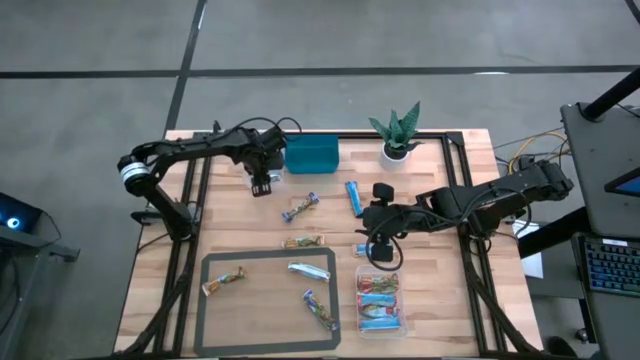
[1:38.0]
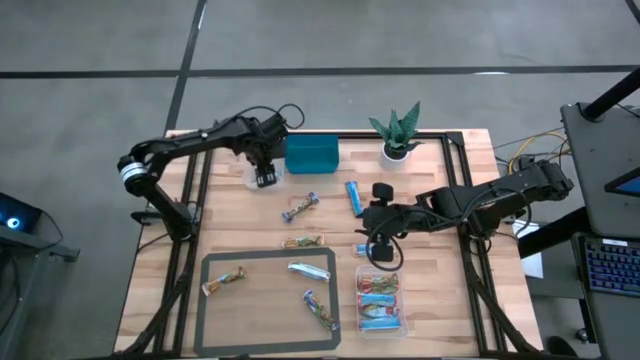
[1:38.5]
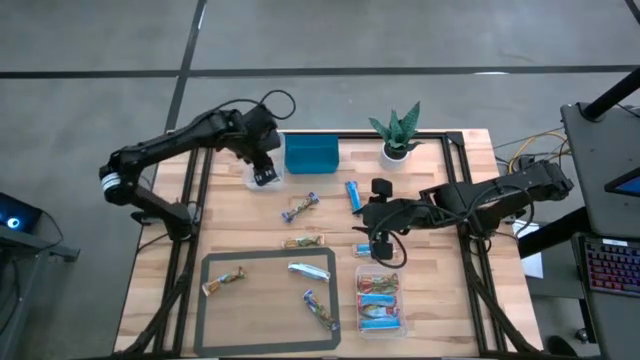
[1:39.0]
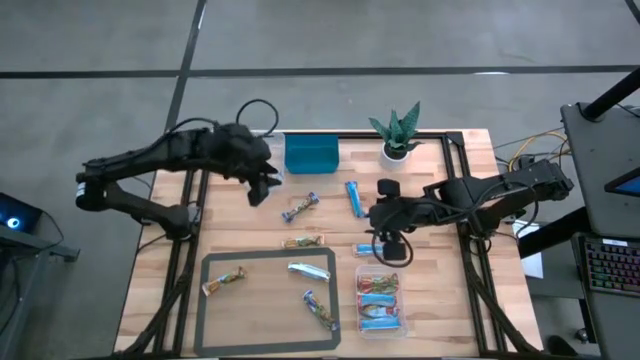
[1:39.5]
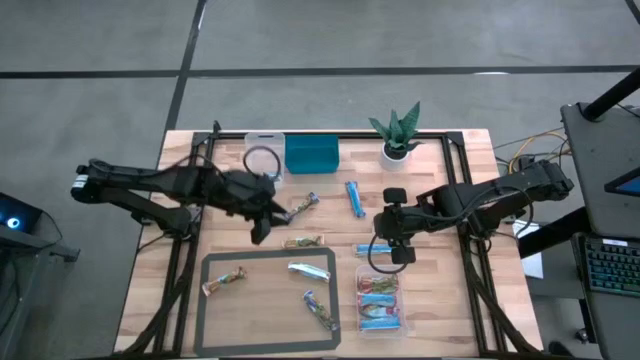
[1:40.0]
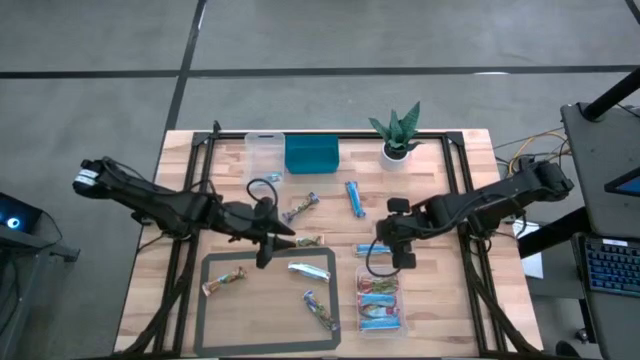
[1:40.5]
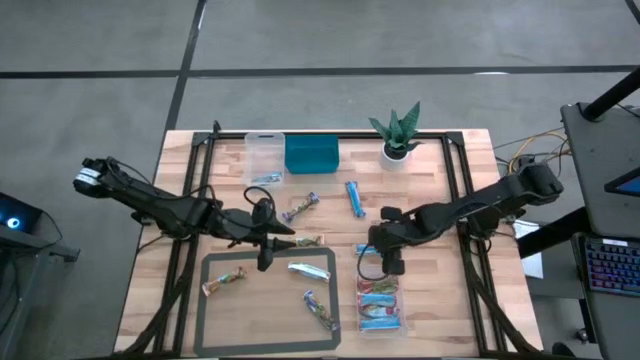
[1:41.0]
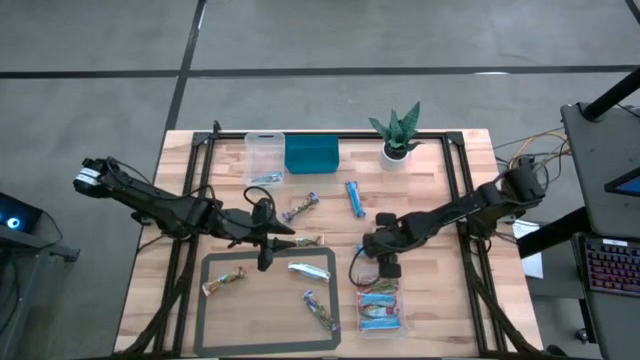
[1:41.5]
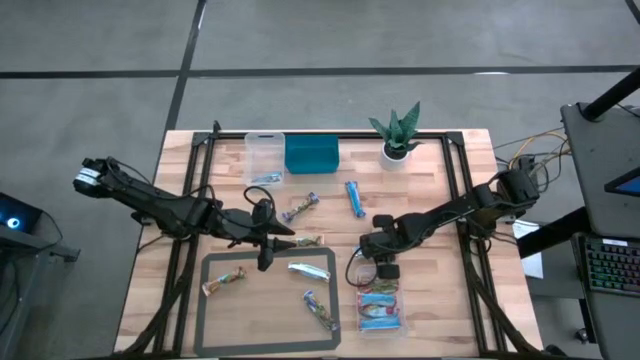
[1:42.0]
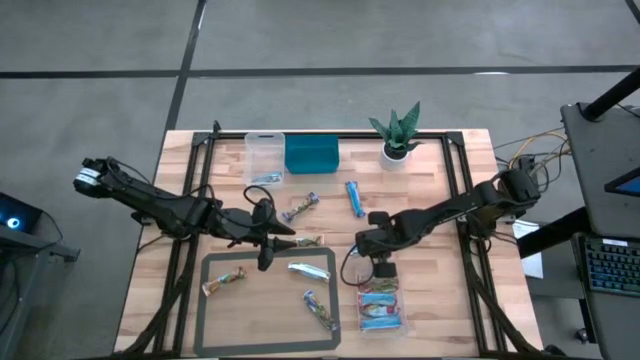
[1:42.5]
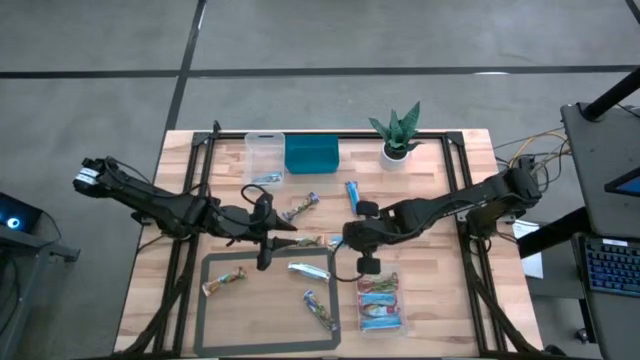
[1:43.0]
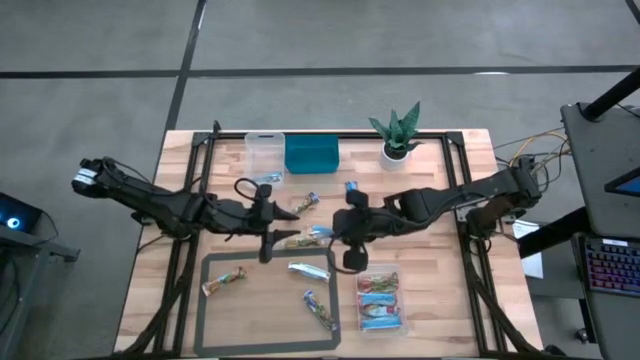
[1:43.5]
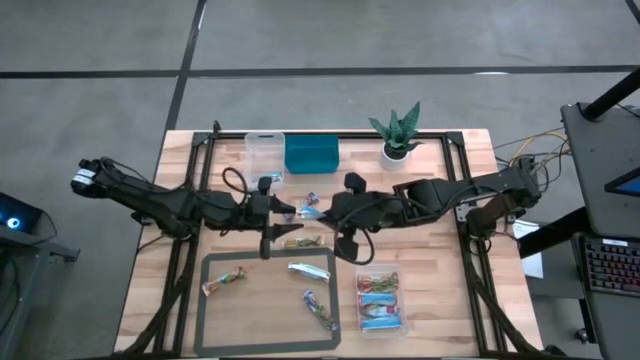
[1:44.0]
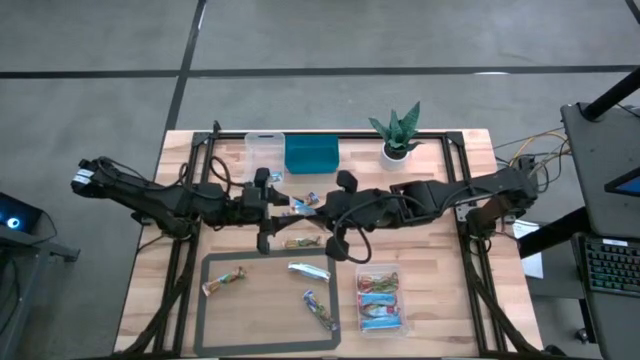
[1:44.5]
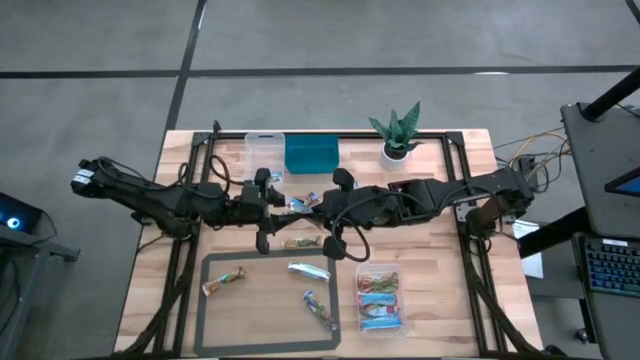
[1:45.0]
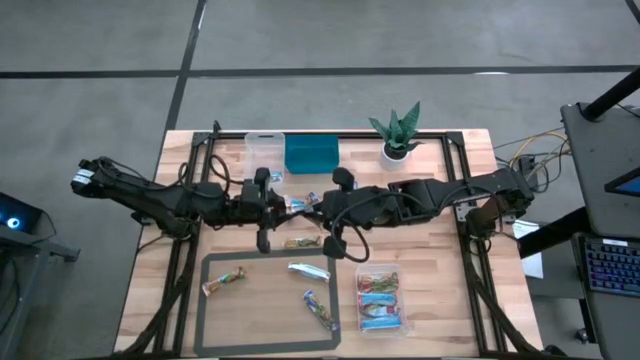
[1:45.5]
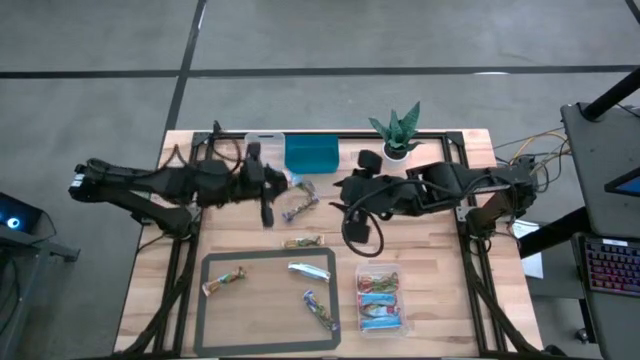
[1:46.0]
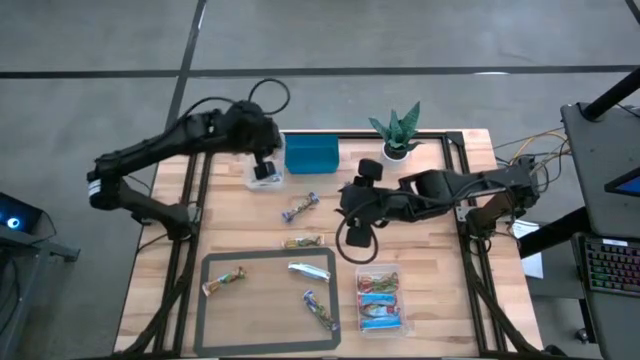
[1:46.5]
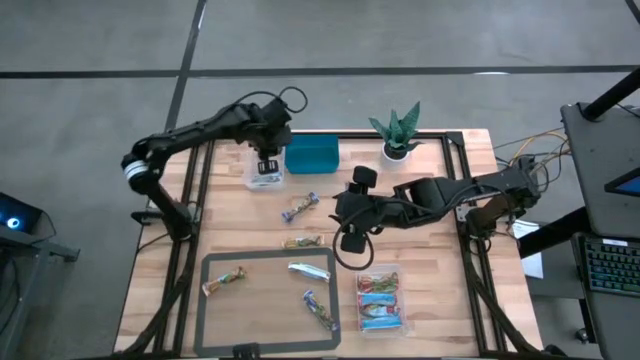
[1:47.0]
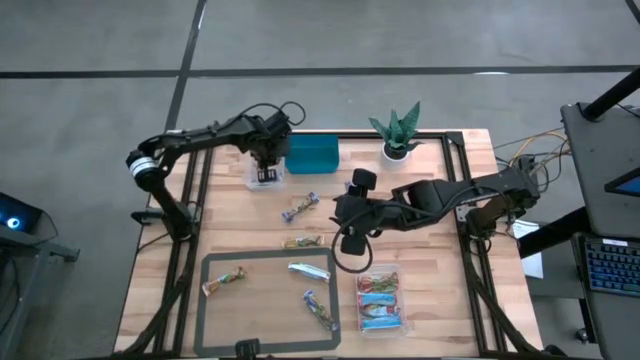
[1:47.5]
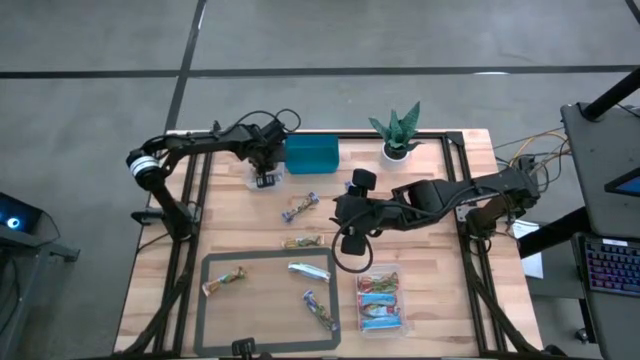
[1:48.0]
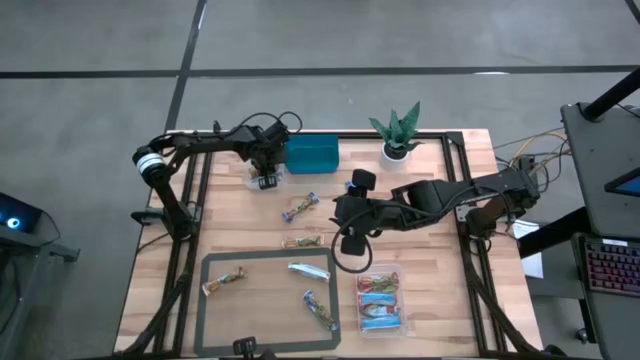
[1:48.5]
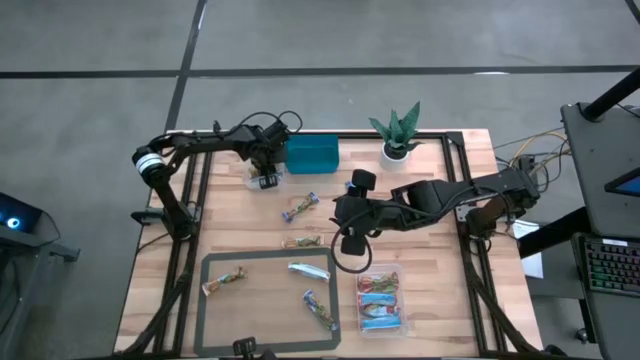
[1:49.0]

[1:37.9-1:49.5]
Task: Pick and place Granola Bars by type
Put the yellow granola bar into the top transparent bin

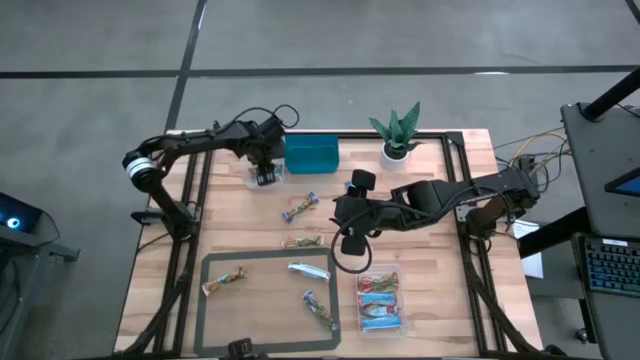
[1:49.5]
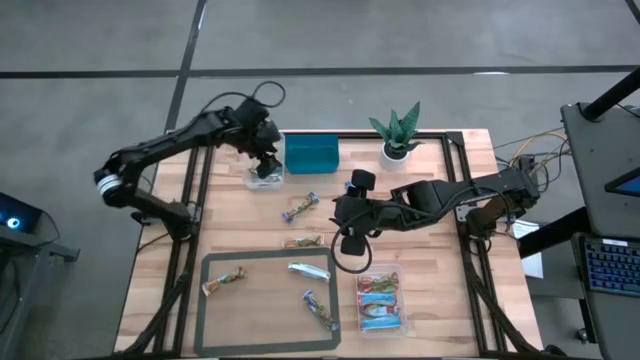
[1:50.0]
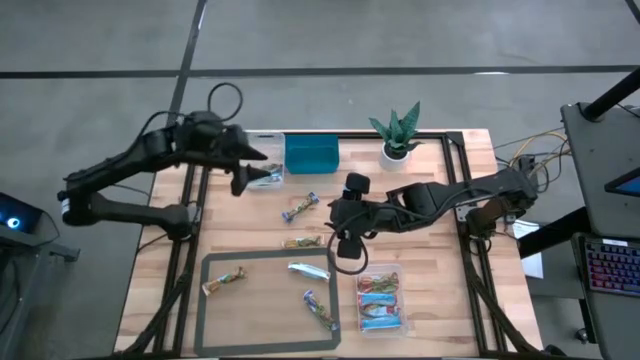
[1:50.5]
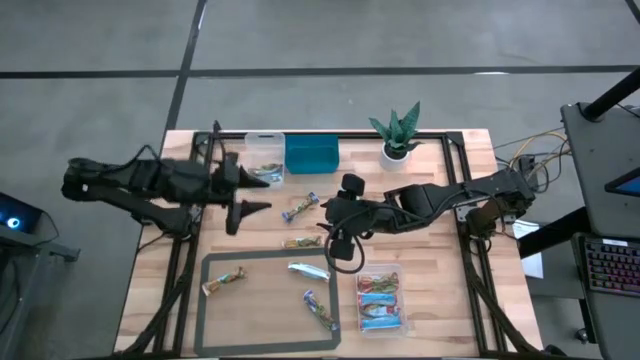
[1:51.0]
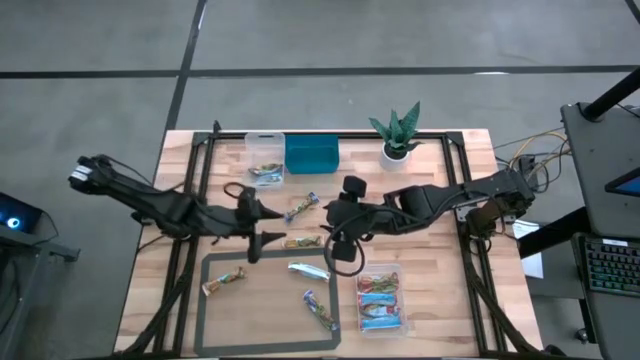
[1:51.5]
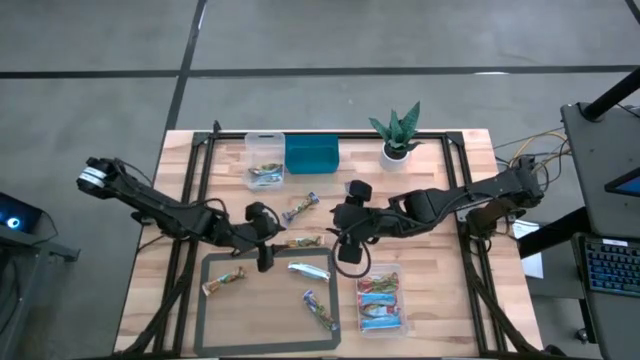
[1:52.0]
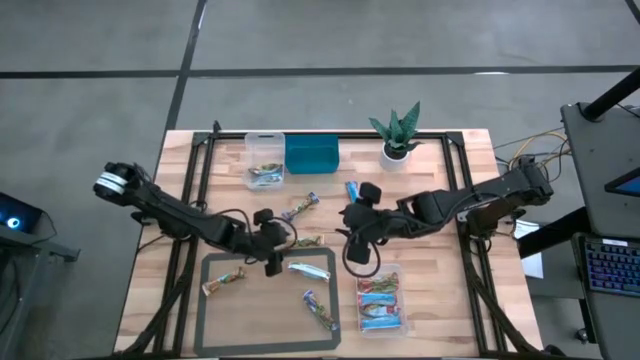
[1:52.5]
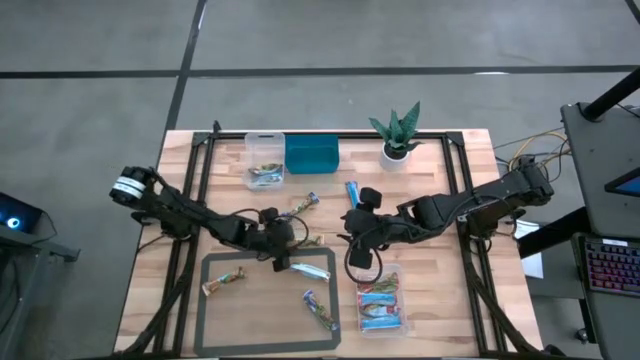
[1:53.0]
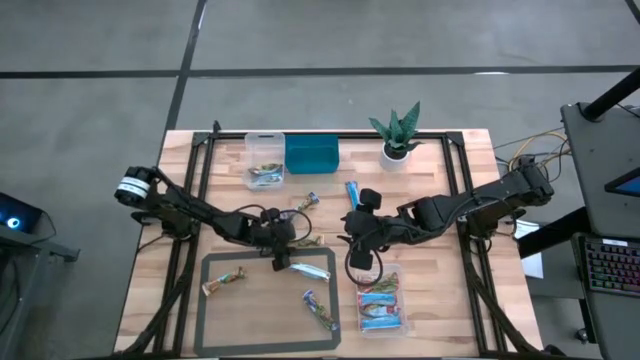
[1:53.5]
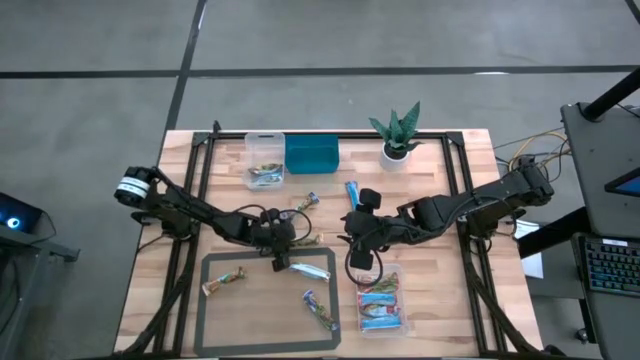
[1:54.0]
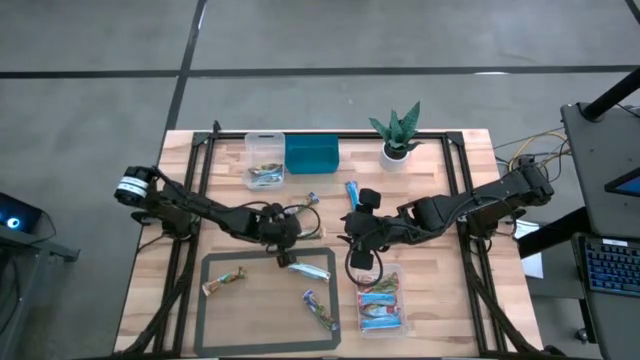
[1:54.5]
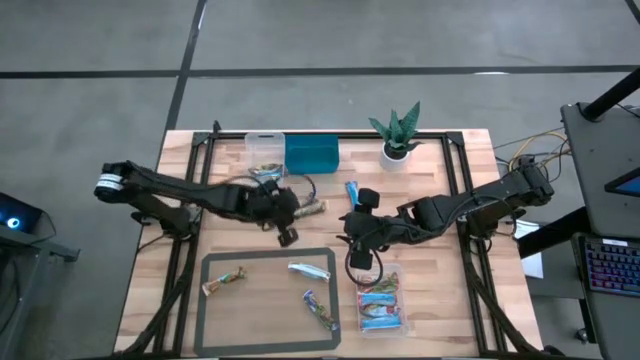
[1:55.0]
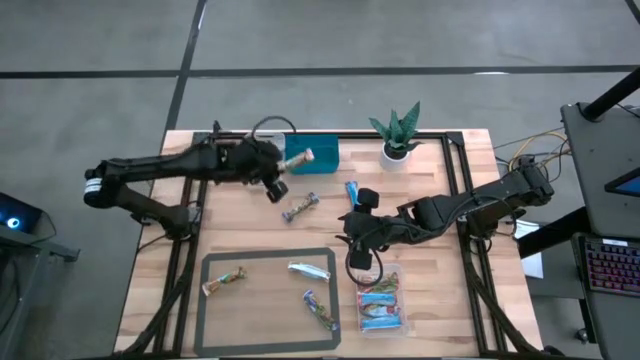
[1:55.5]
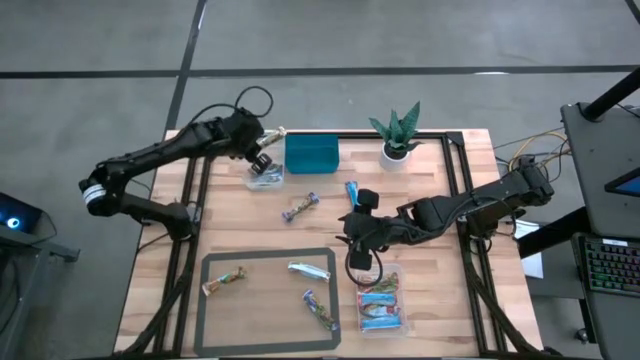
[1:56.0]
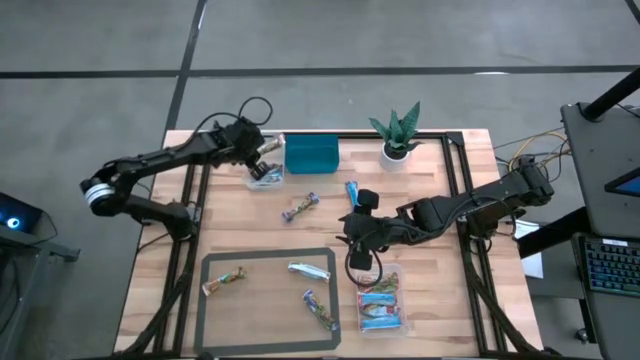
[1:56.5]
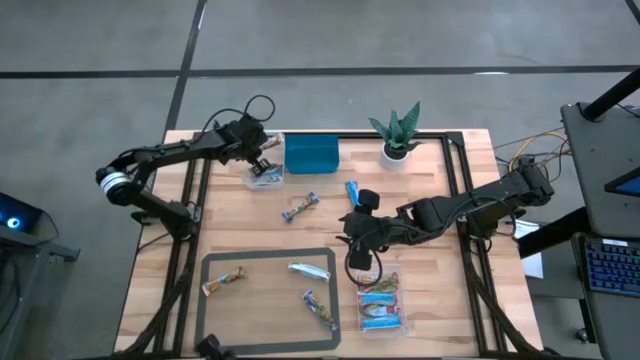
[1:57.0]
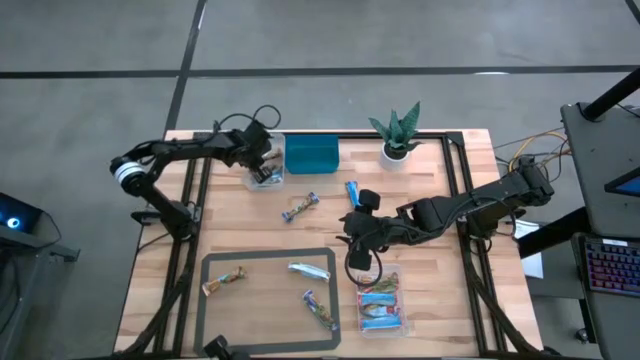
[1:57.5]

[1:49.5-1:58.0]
Put the yellow granola bar into the top transparent bin

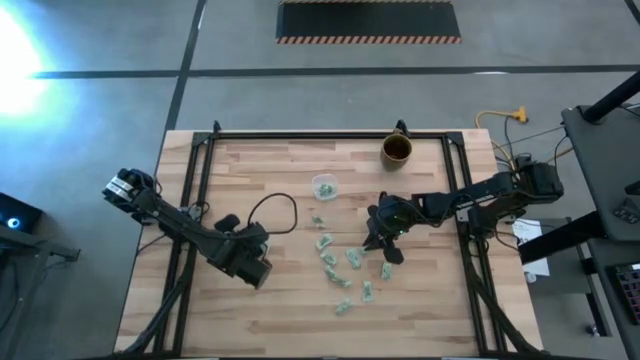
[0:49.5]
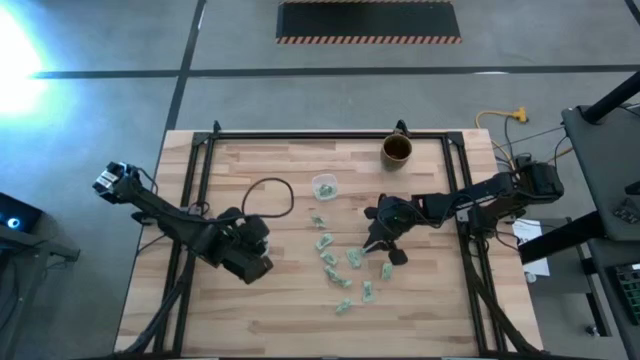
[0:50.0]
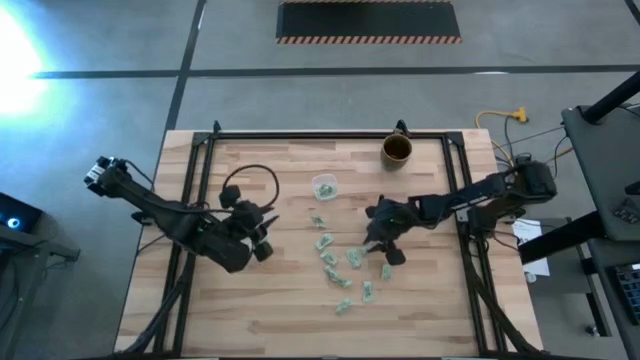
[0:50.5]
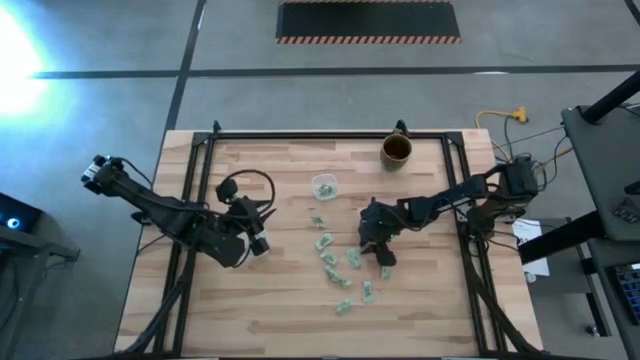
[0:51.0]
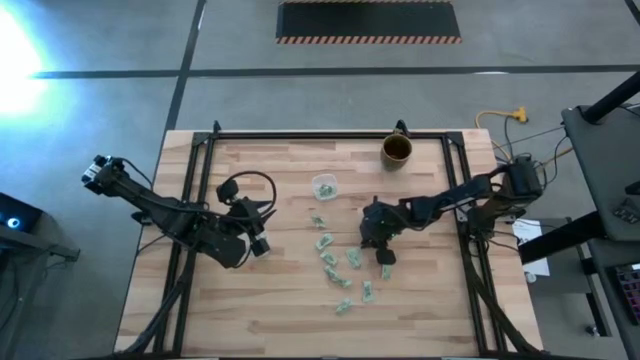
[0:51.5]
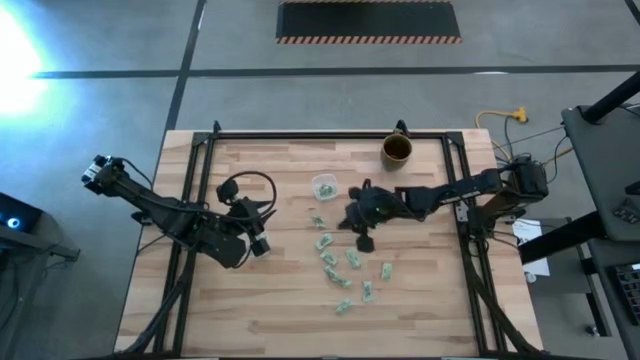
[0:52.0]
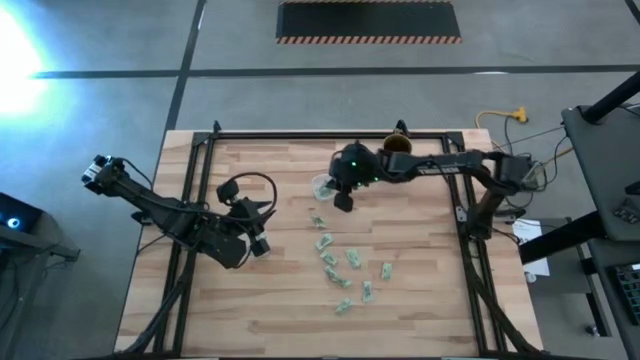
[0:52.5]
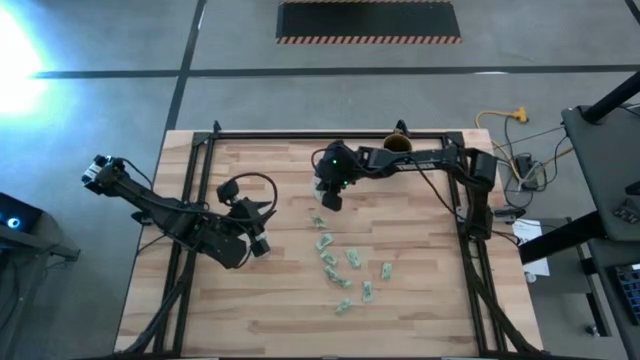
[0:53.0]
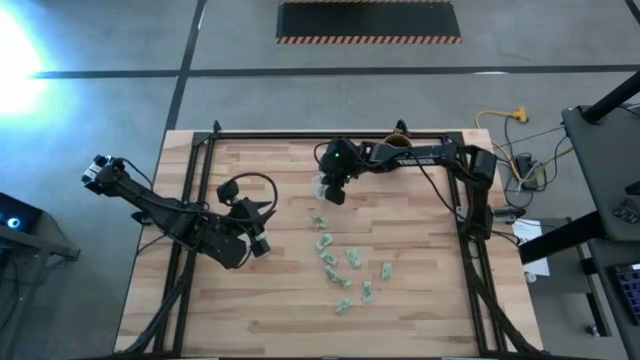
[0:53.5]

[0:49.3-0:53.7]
Task: Pick and place Stevia / Truvia into bins
Put the stevia packet into the top transparent container
